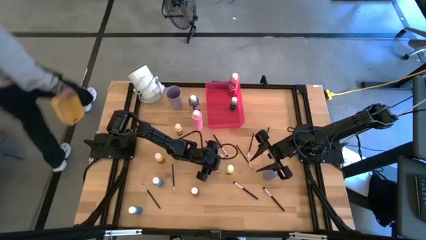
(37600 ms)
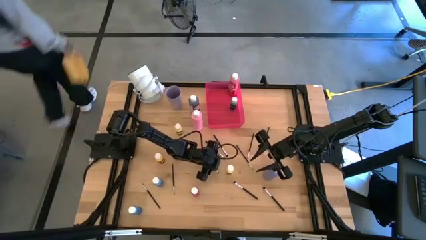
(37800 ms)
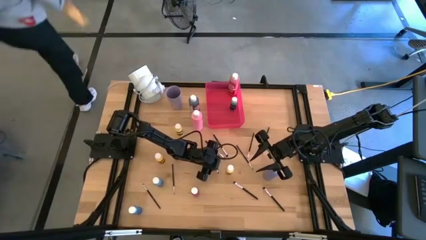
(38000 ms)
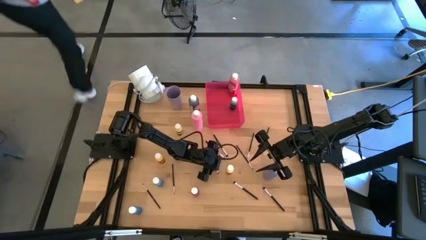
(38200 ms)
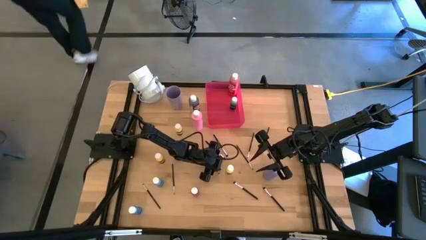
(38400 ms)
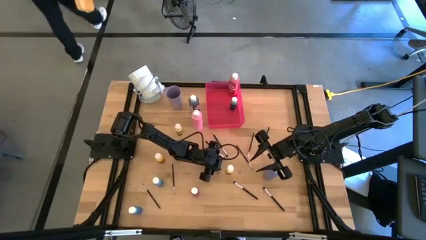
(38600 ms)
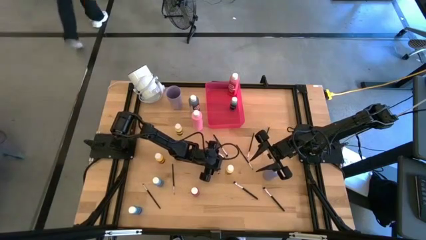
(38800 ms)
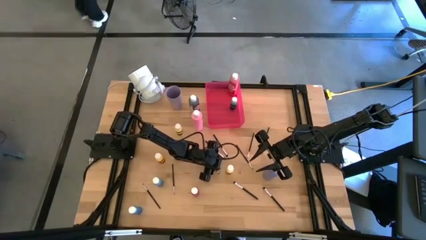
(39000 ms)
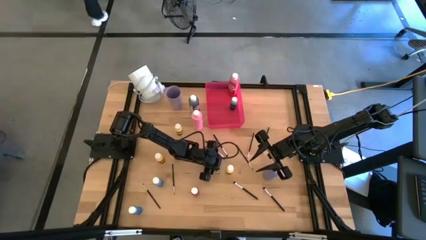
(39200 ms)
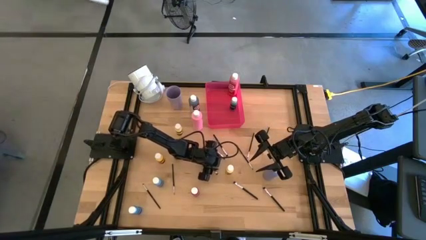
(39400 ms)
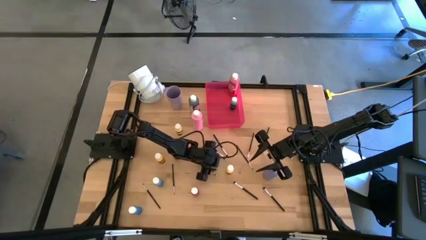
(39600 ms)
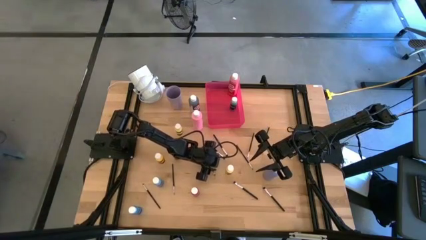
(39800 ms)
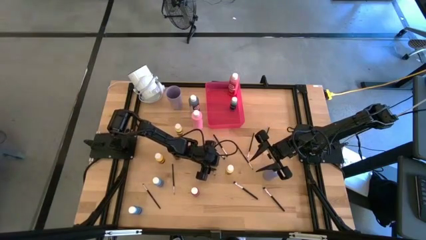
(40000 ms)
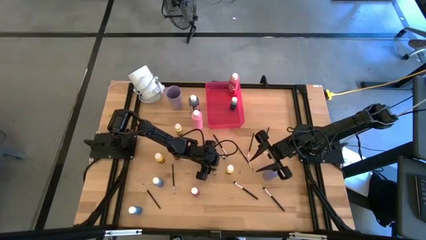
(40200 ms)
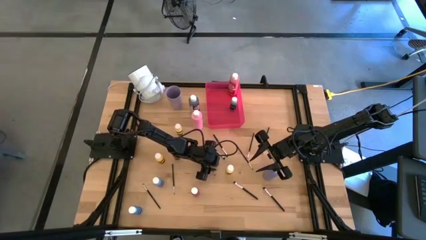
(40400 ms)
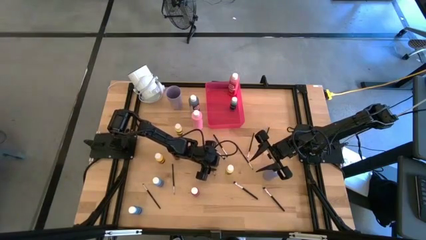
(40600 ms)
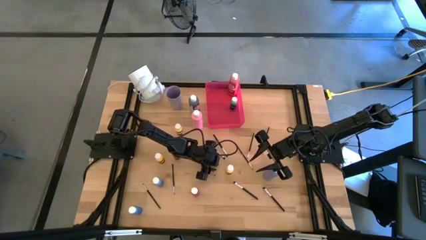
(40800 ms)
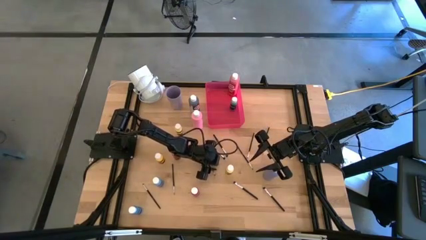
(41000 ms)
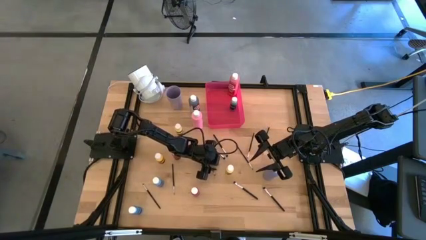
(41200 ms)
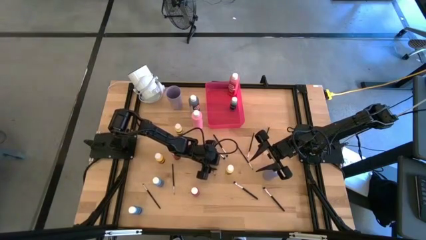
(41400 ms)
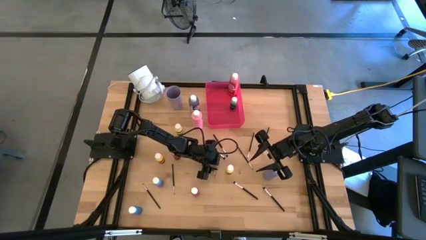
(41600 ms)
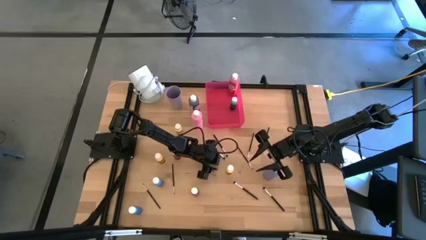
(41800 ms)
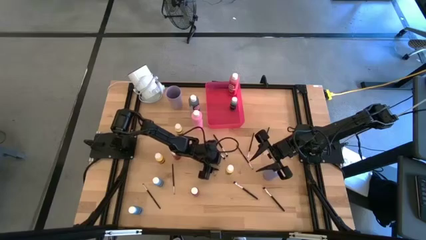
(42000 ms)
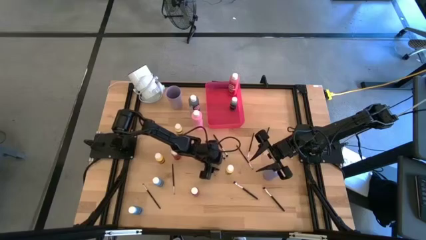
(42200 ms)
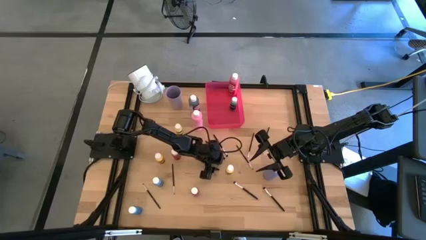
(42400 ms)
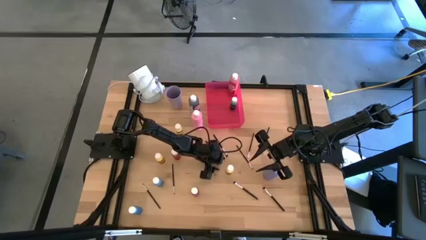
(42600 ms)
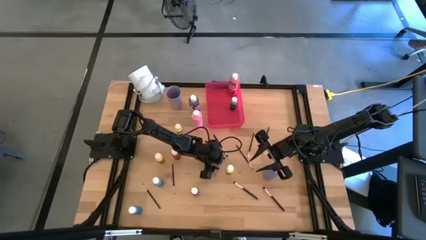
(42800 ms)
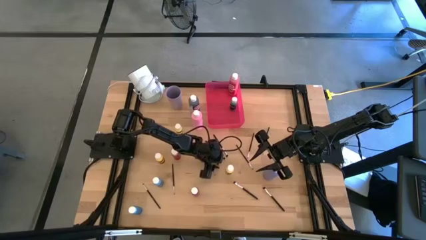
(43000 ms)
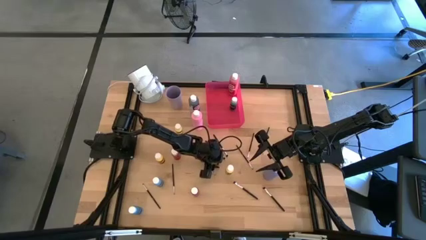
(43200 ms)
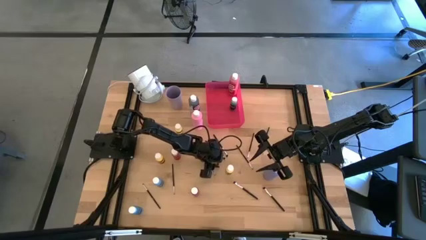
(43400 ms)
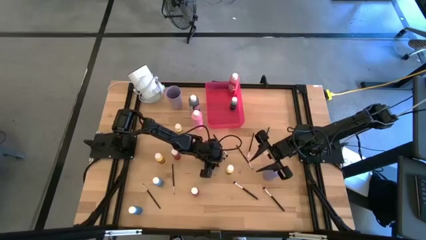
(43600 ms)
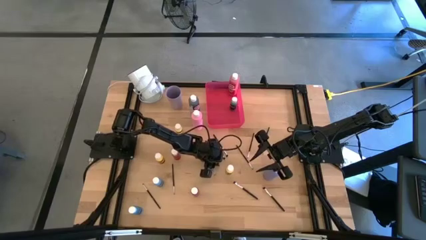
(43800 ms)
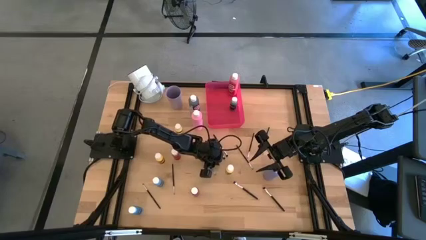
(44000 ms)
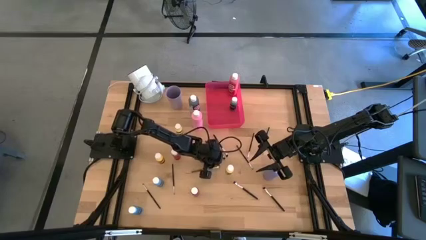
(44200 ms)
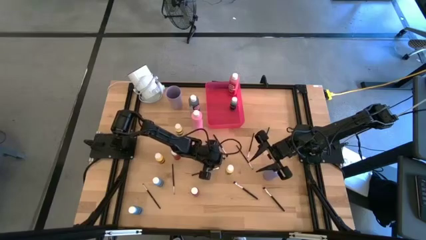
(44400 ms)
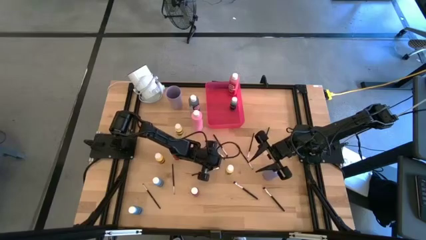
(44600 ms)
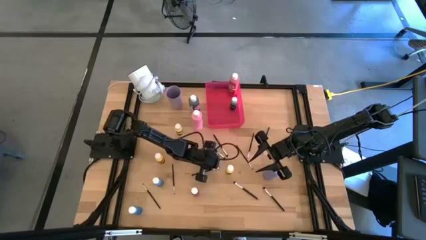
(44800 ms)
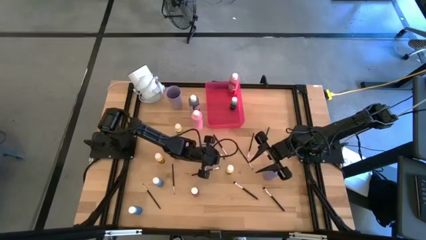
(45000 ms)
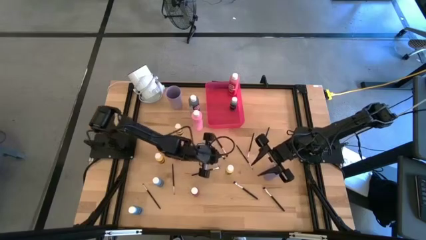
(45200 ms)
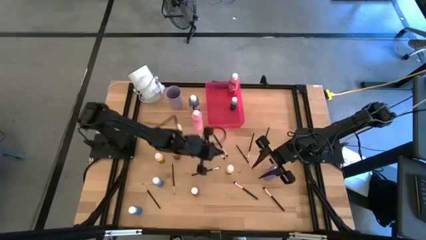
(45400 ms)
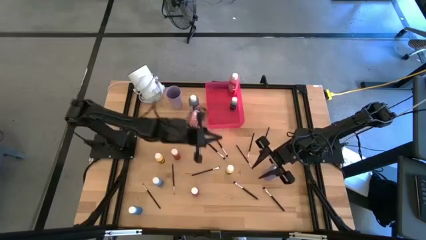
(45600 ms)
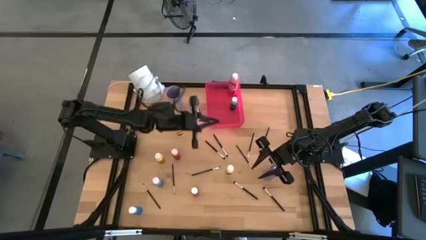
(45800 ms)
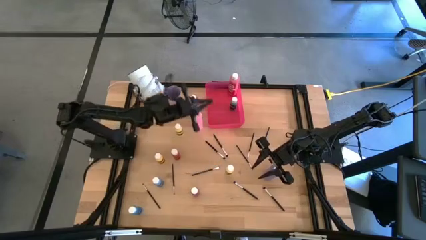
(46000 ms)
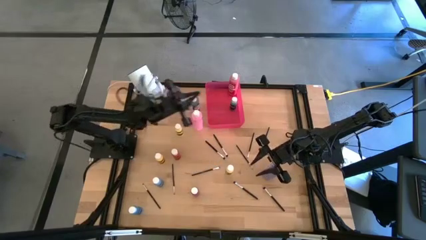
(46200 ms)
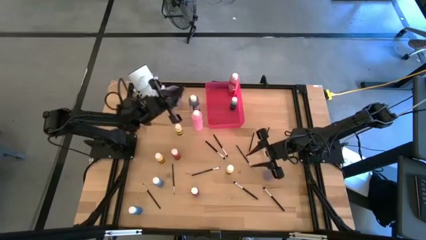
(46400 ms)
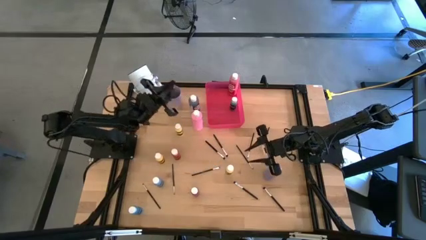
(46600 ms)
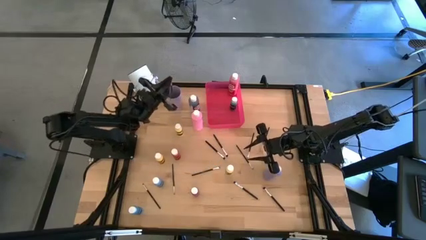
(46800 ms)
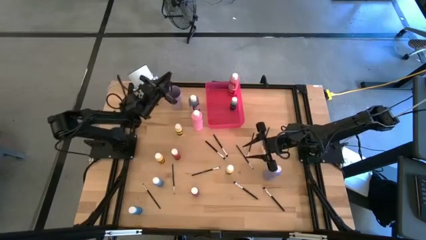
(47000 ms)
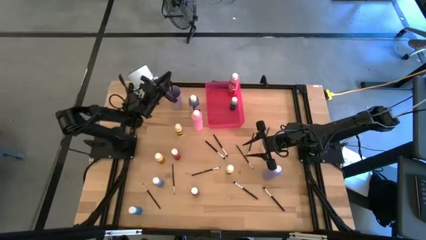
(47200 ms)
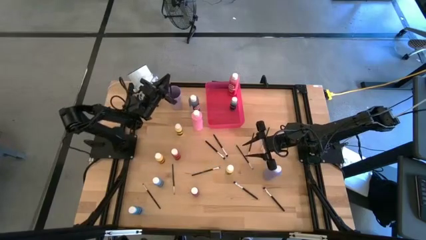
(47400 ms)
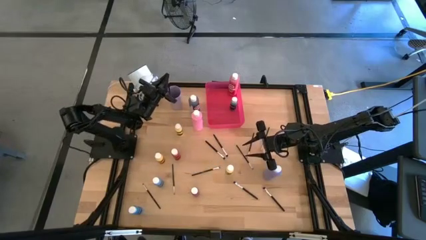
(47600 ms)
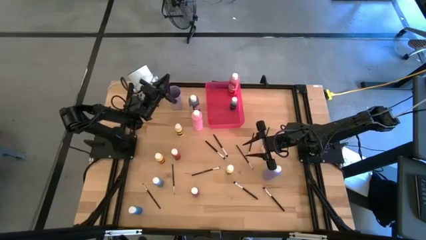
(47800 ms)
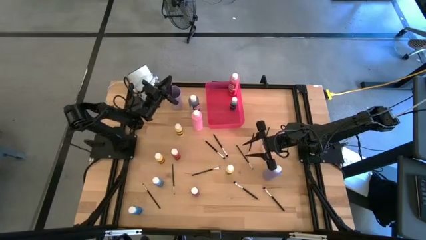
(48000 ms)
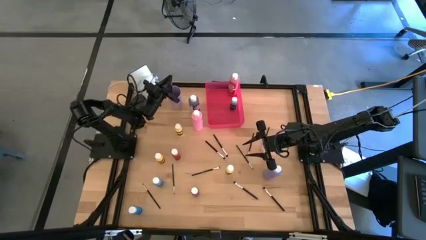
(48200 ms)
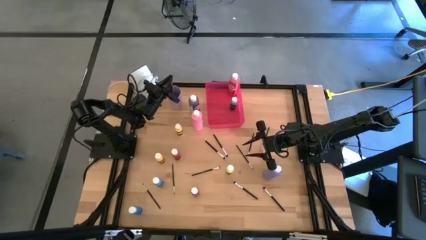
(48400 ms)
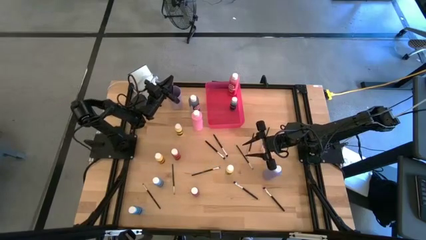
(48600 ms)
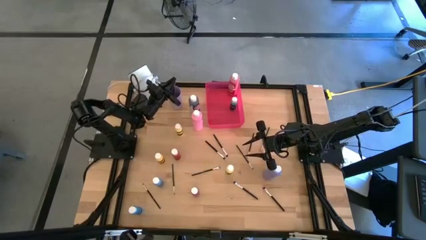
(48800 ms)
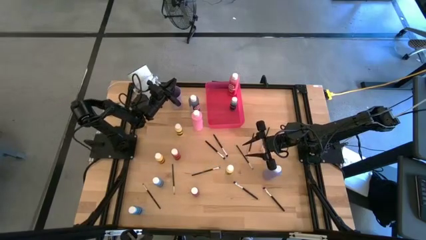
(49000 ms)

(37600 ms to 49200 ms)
Task: Pick & Place Paint Supplies
Put the black paint brush into the purple cup

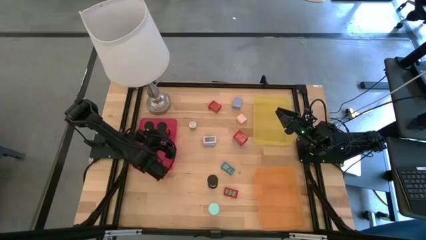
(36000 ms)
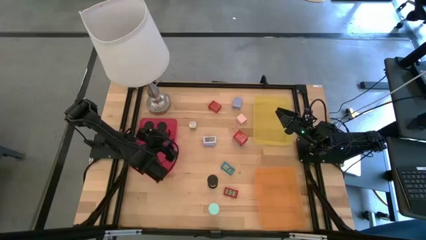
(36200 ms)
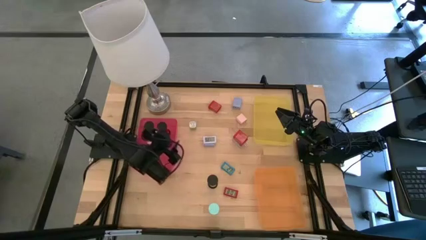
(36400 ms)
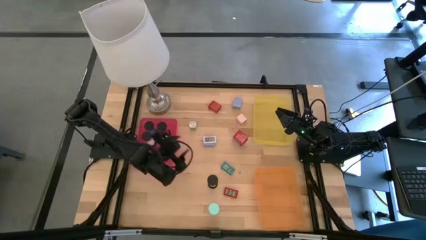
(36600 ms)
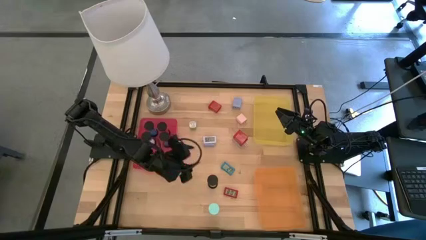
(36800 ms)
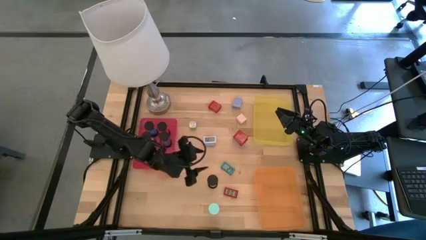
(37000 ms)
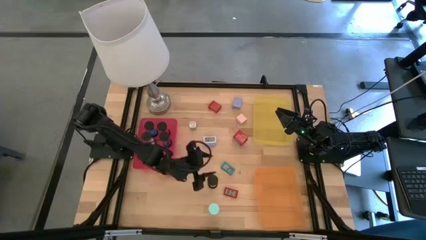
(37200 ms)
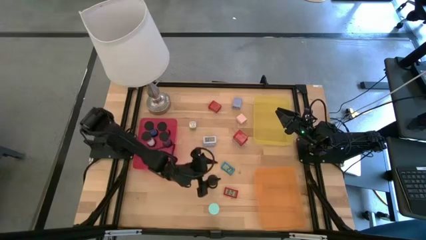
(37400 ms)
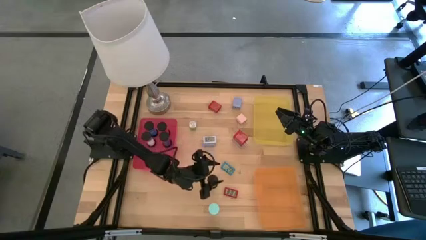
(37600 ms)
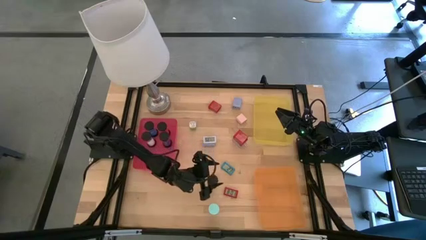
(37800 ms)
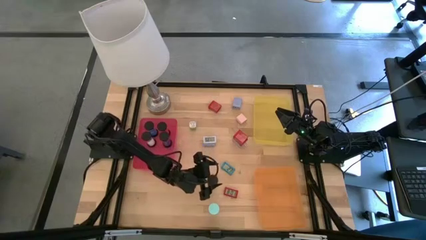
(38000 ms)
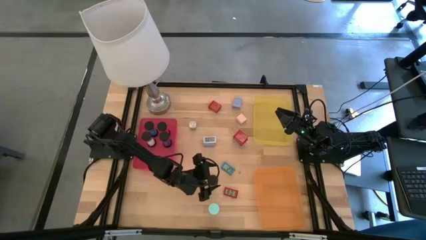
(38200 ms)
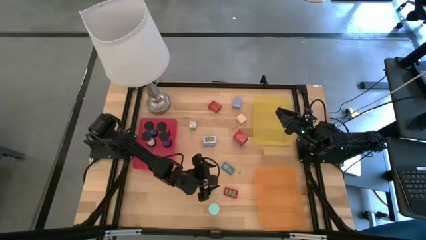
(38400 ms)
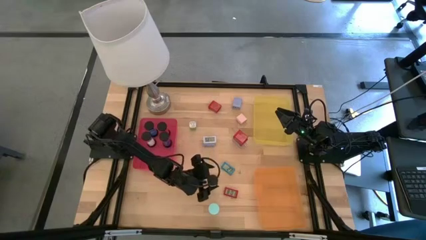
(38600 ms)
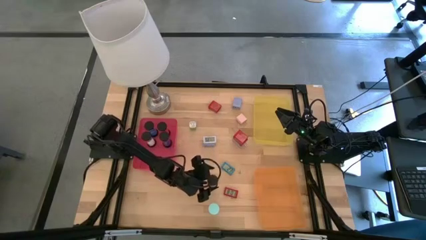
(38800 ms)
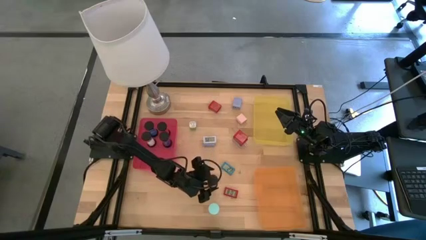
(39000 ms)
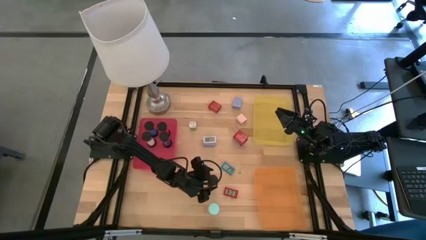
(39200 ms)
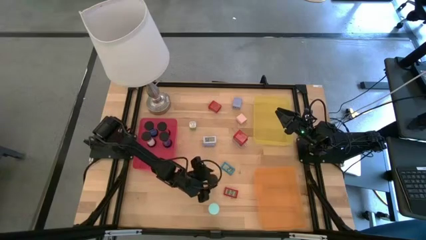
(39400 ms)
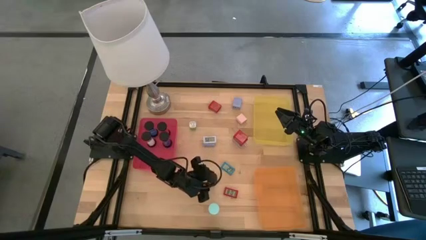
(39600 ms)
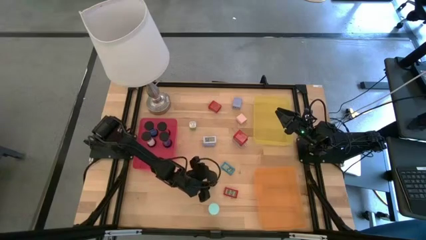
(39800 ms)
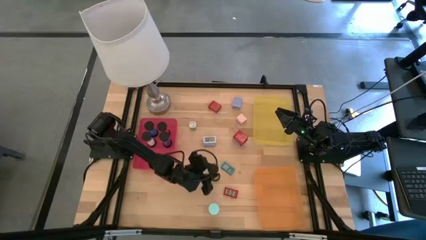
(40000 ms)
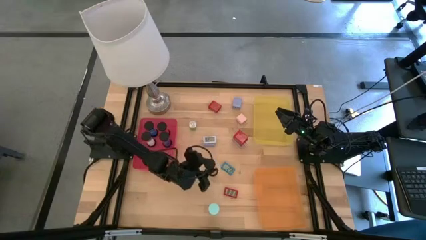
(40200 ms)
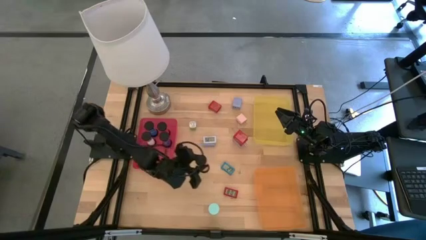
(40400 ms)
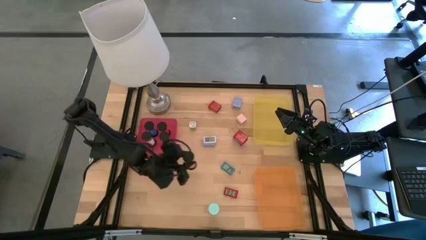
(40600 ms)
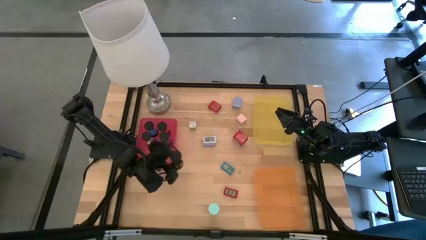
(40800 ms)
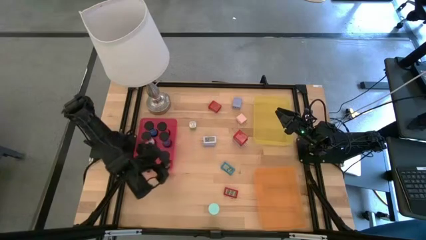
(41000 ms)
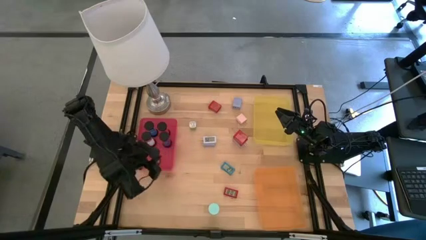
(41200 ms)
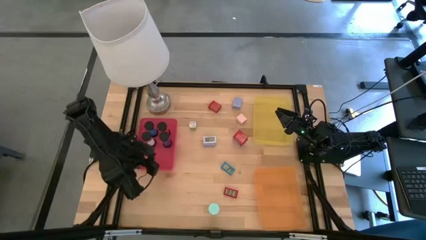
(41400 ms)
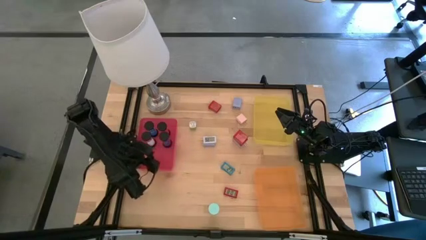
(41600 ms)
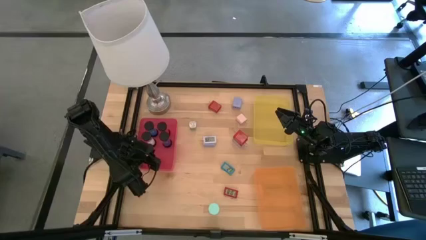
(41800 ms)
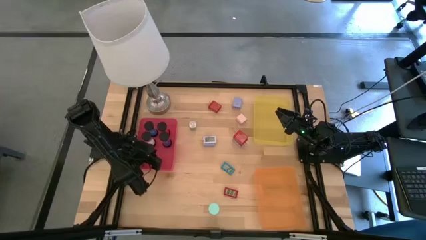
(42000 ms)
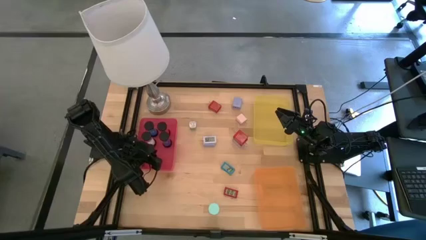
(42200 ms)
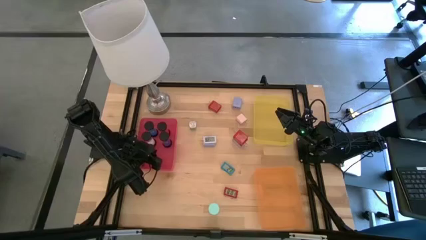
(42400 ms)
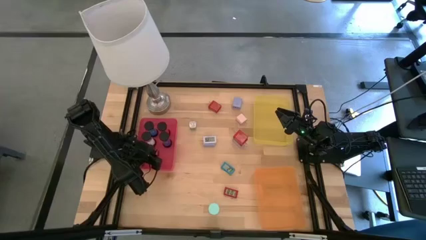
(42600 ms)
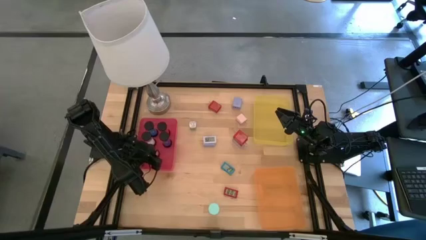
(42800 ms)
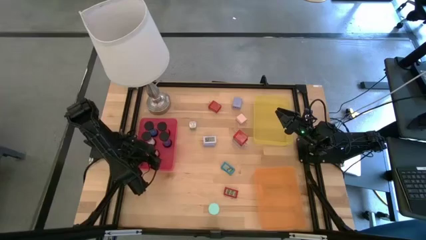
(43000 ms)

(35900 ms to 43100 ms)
Task: Pick & Place Office items
Put the orange hourglass timer into the red bin
